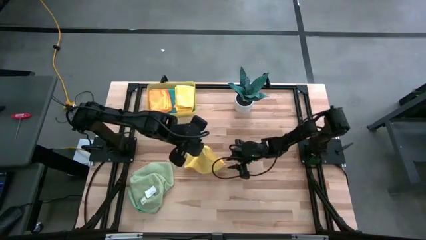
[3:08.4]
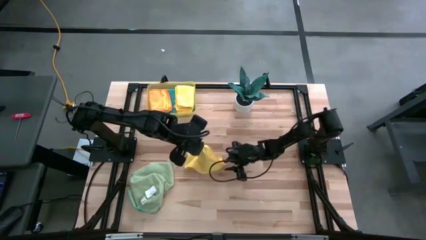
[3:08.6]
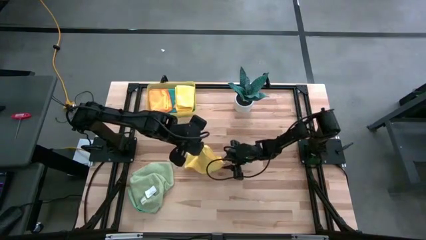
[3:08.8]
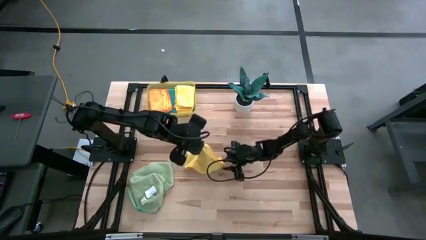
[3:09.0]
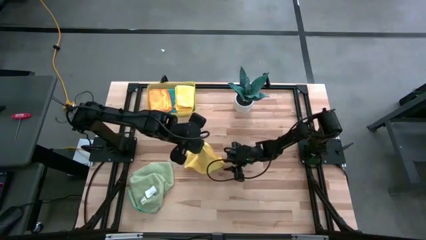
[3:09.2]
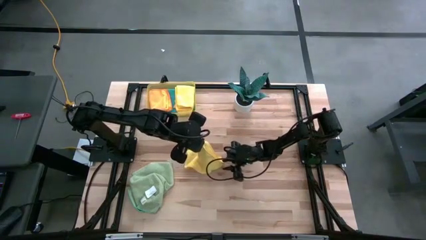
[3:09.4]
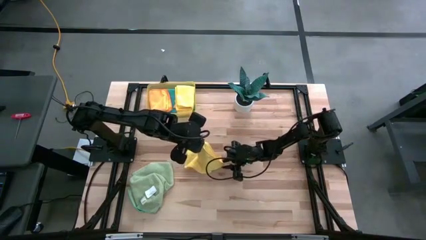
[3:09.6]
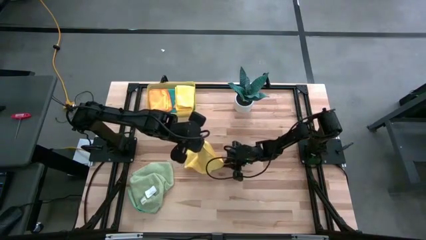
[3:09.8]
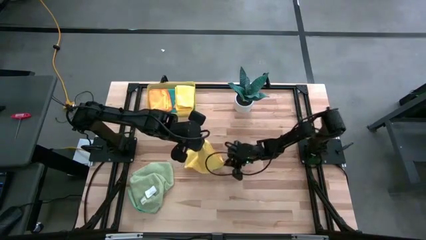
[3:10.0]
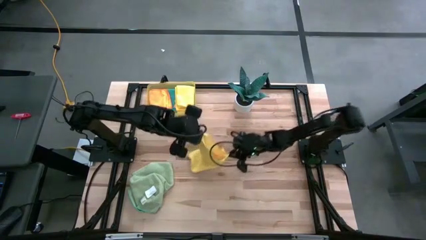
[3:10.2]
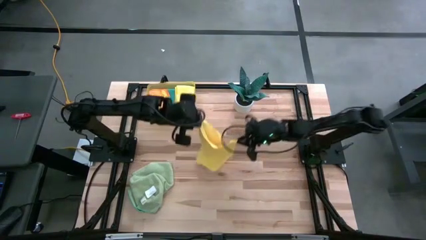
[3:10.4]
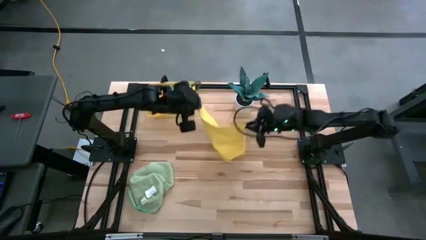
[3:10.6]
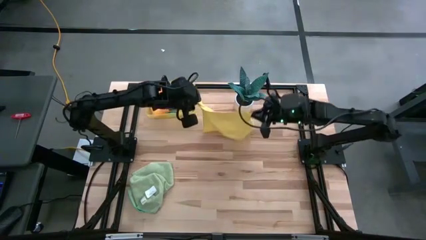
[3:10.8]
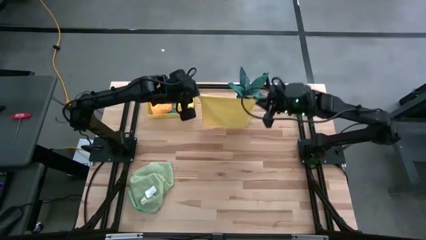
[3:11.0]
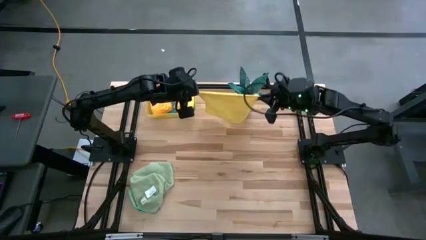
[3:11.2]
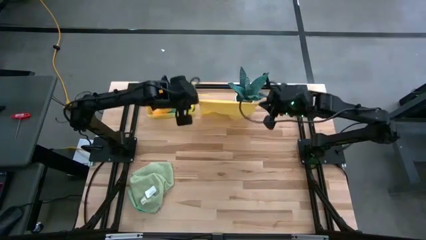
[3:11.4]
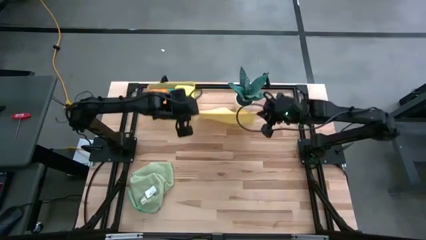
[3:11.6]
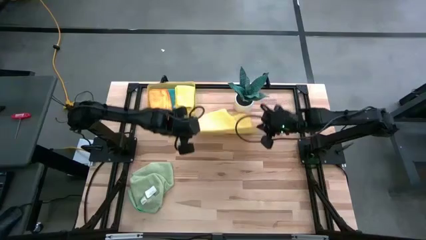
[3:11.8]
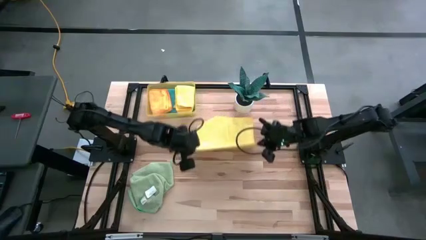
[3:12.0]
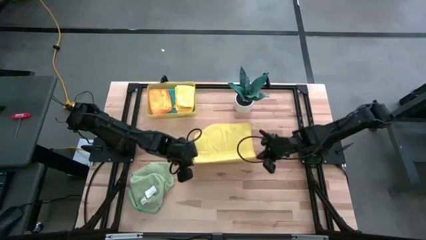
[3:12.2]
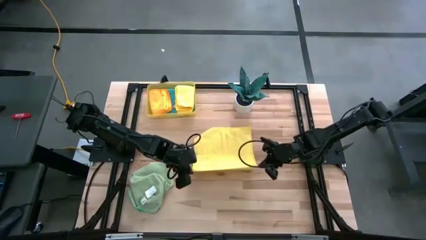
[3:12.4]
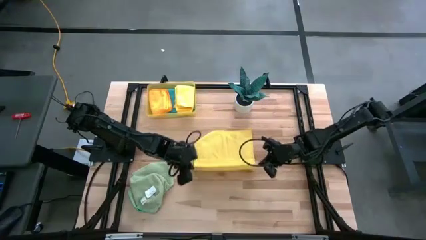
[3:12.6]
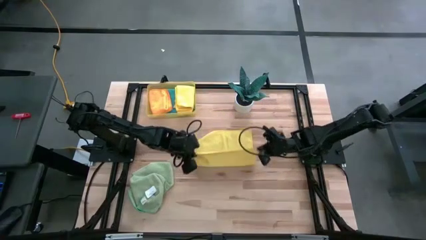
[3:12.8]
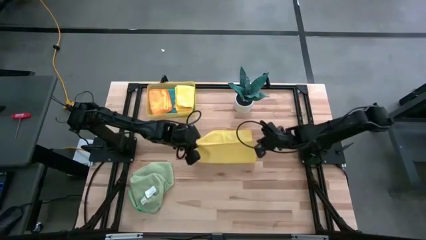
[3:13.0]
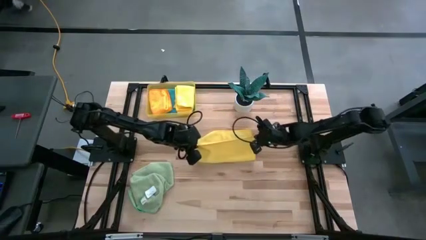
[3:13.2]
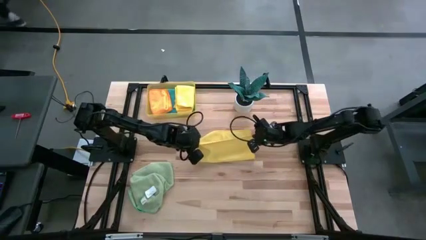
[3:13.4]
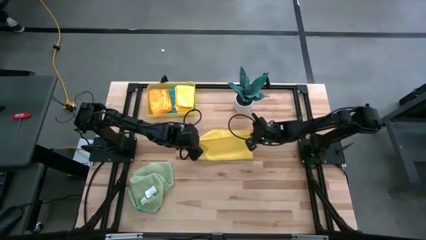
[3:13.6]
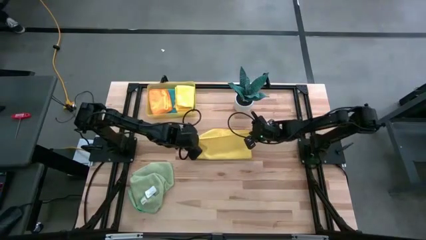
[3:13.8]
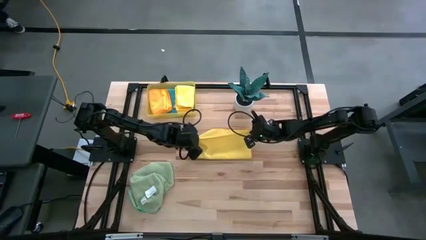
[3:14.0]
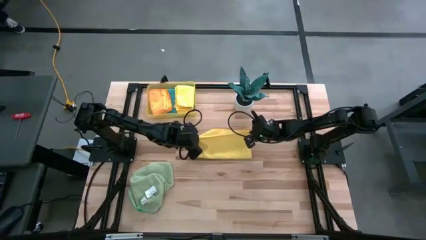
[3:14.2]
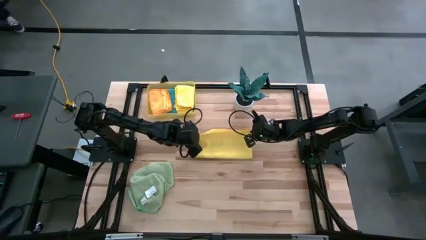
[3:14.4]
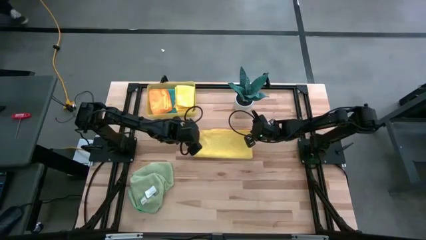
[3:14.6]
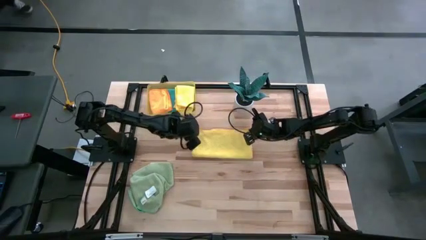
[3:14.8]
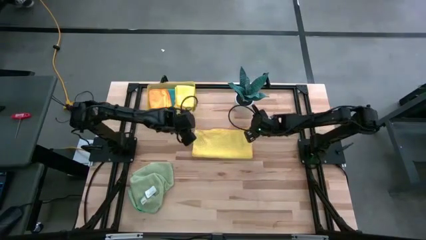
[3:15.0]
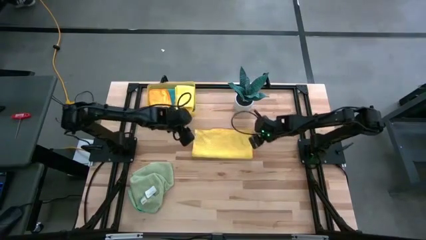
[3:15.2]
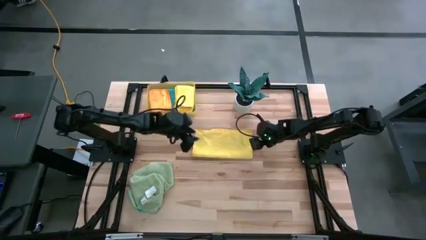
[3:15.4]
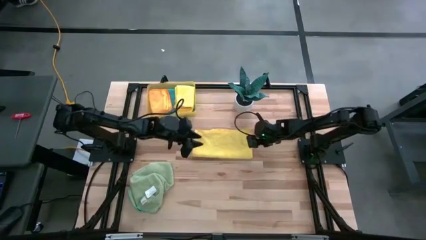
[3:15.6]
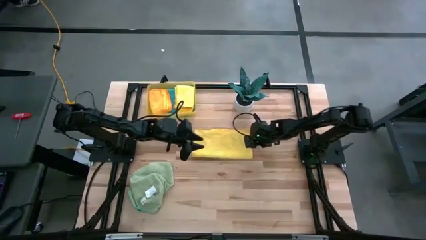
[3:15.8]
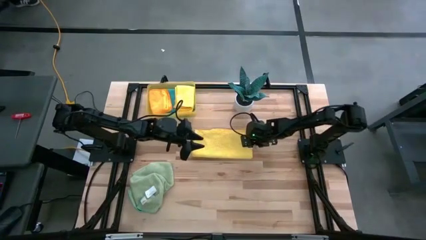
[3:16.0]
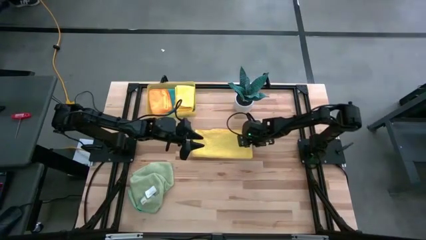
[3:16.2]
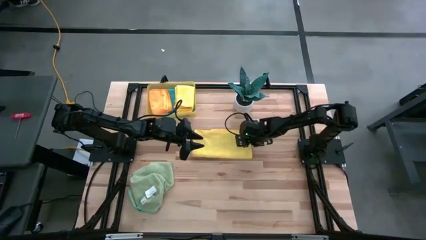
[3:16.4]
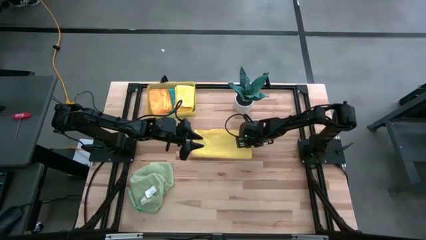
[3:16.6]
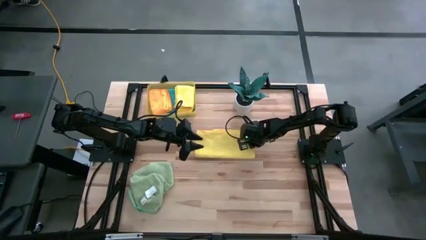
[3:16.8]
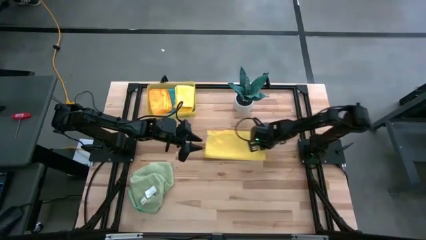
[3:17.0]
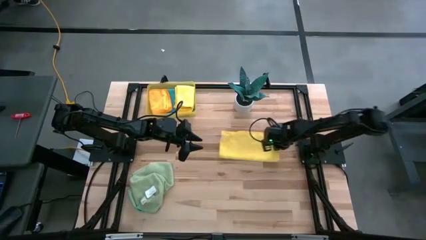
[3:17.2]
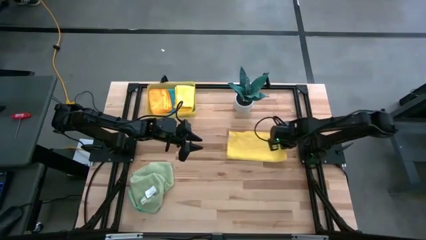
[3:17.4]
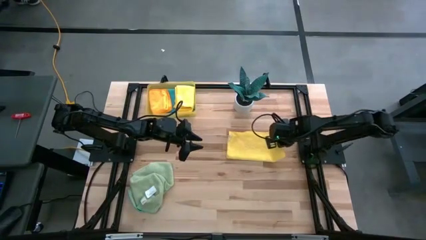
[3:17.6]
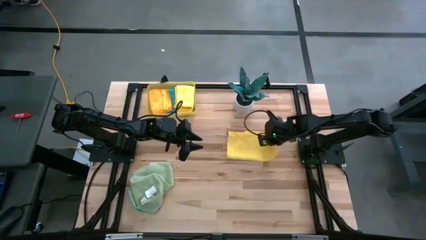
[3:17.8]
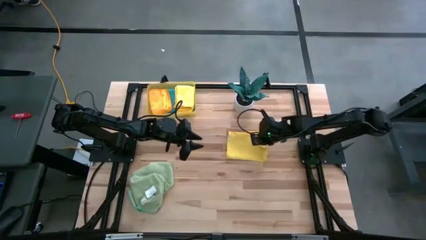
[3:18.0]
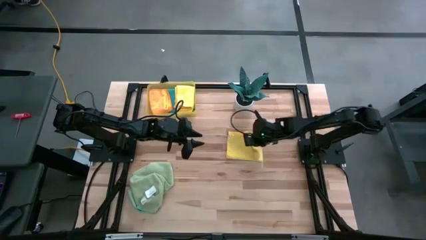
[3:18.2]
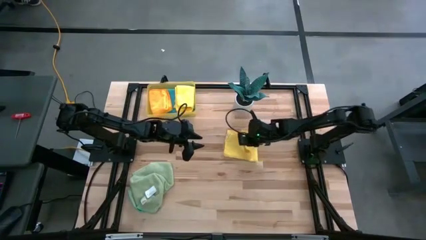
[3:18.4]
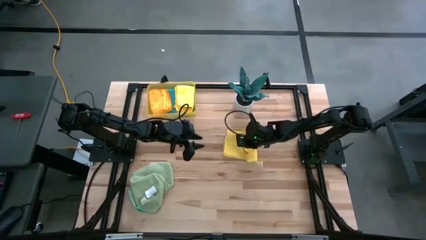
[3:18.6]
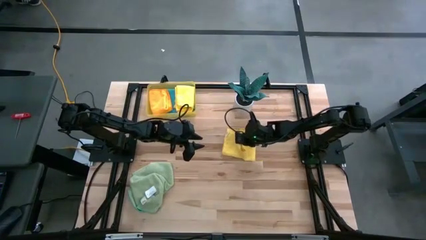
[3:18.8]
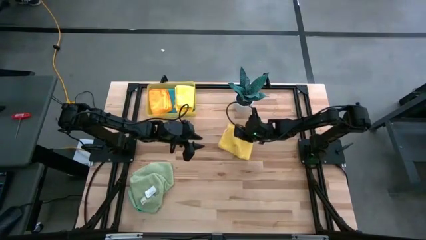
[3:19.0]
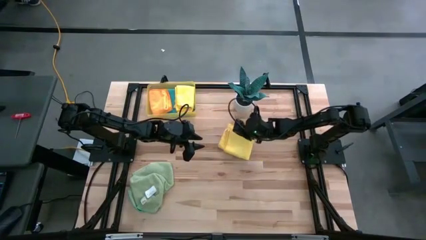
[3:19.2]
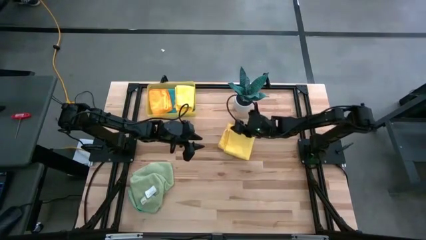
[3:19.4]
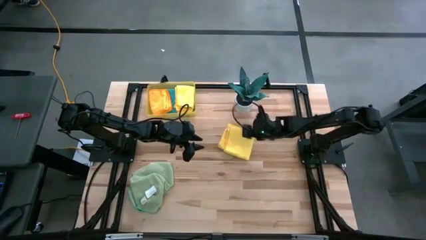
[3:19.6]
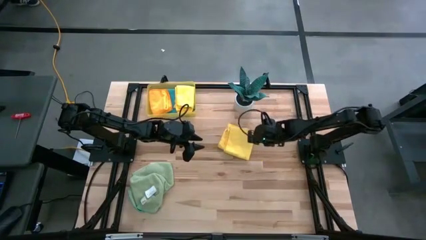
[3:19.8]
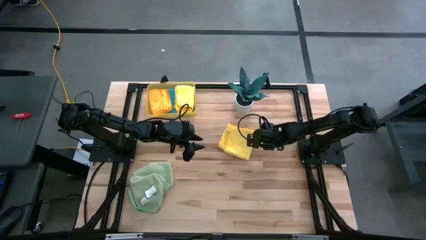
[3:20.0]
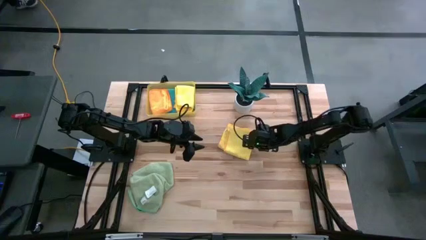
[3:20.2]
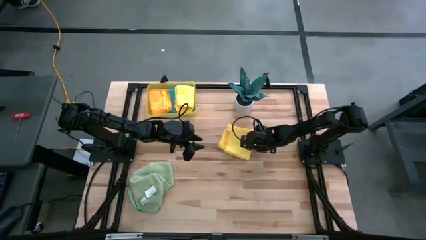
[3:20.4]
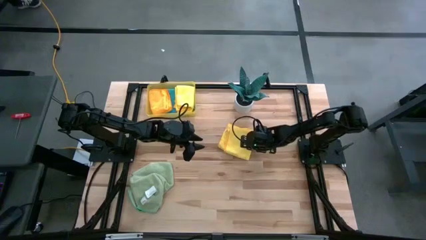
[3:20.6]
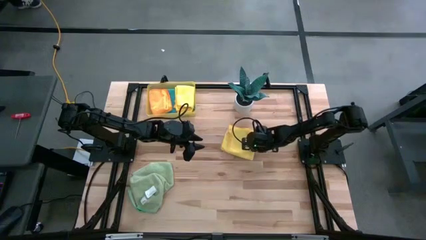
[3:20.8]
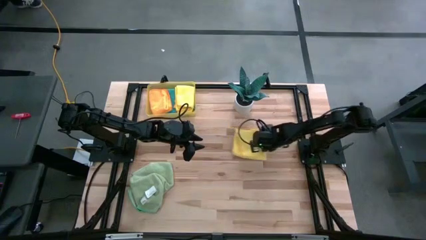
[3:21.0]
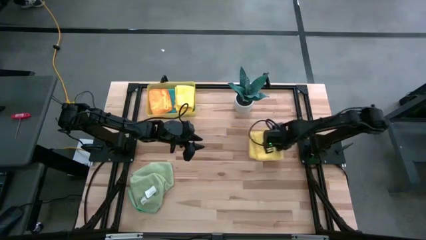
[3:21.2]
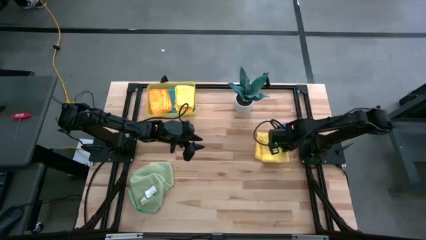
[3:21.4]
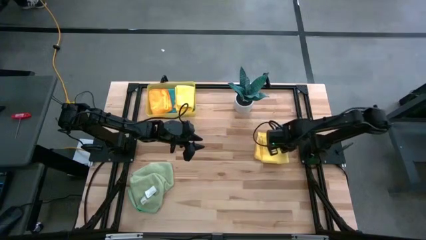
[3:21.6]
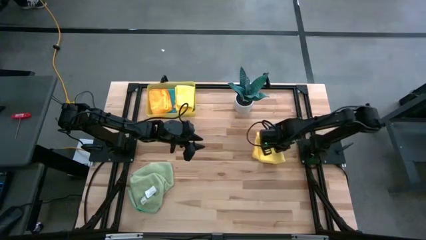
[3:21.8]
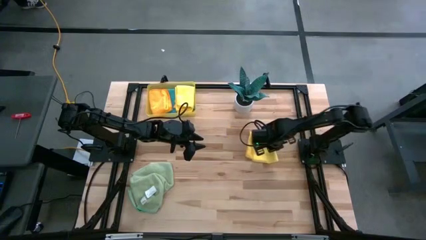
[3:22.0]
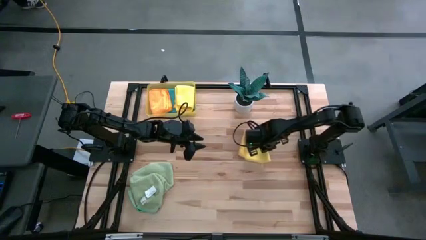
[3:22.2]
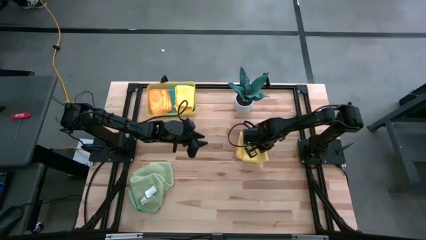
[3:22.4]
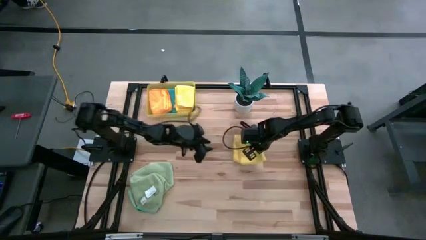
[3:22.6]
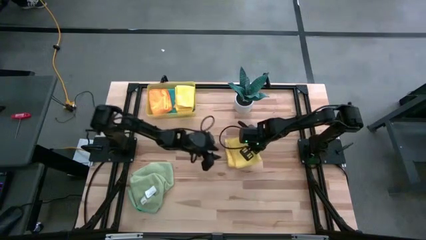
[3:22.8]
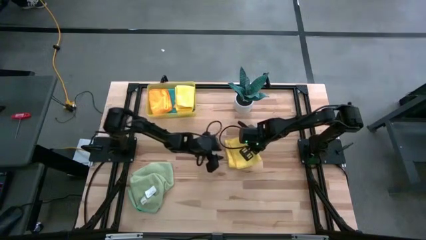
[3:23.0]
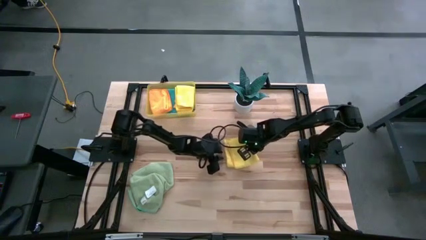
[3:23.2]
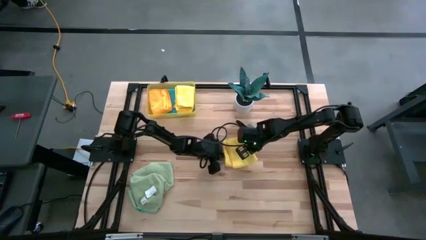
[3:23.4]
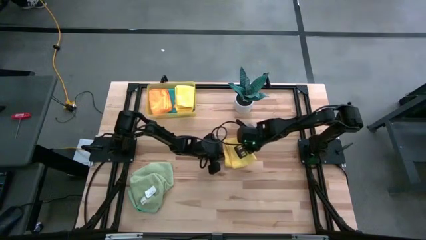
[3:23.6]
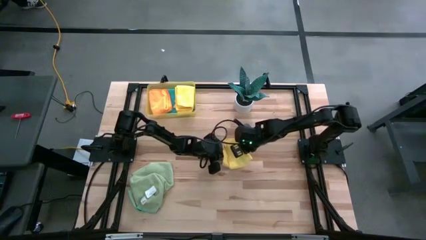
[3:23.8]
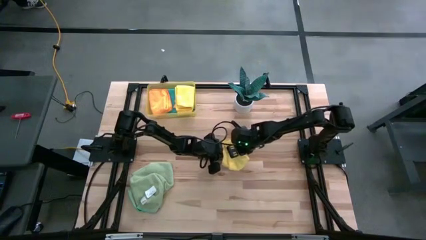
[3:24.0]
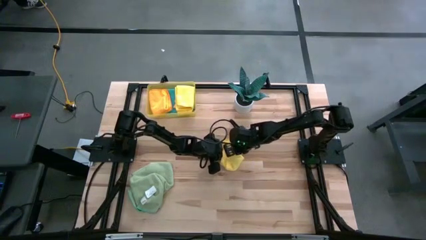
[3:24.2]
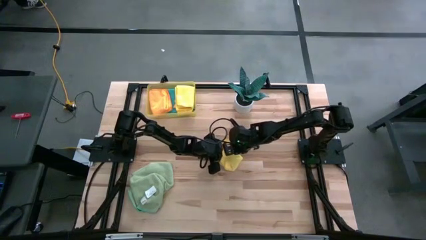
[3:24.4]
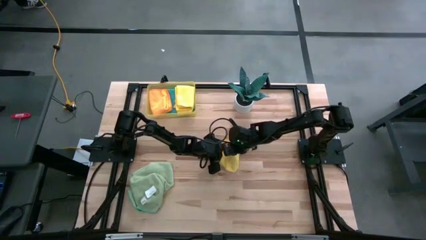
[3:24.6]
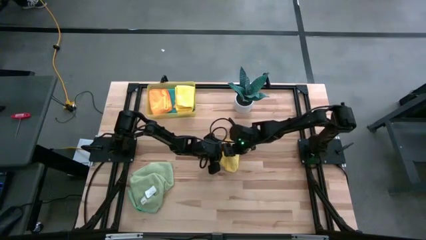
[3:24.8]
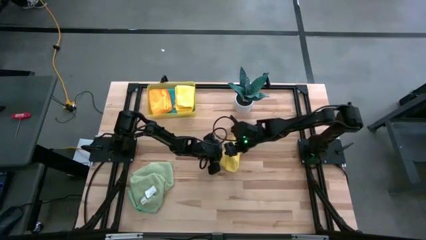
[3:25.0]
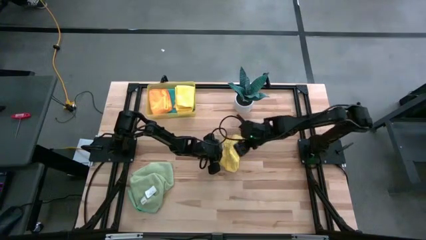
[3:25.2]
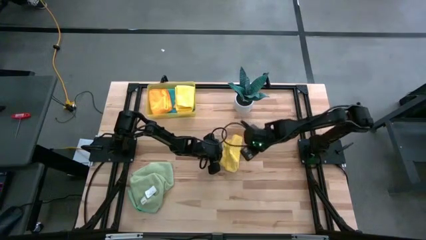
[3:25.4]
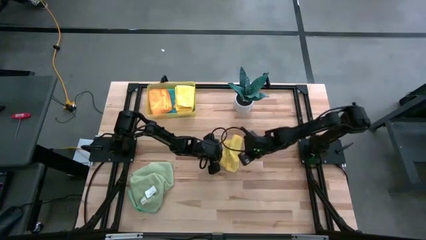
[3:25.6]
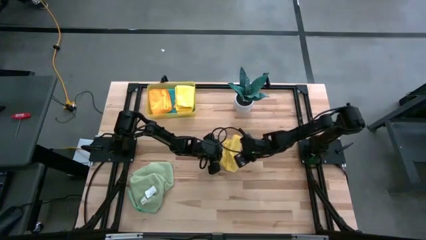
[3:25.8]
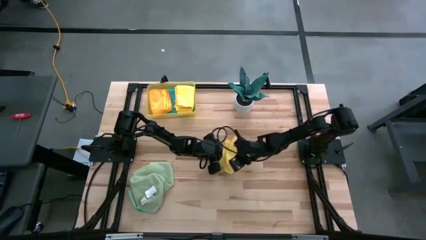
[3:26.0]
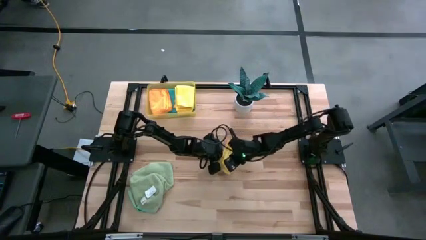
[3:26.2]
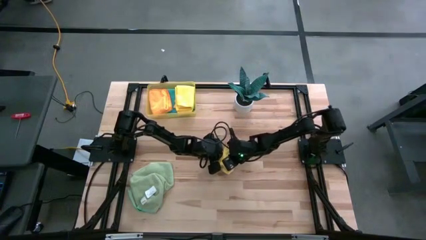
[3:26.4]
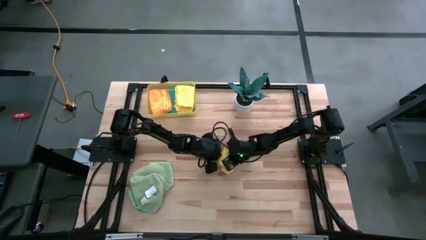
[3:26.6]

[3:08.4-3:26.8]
Task: Fold microfiber towels
Fold the yellow microfiber cloth
